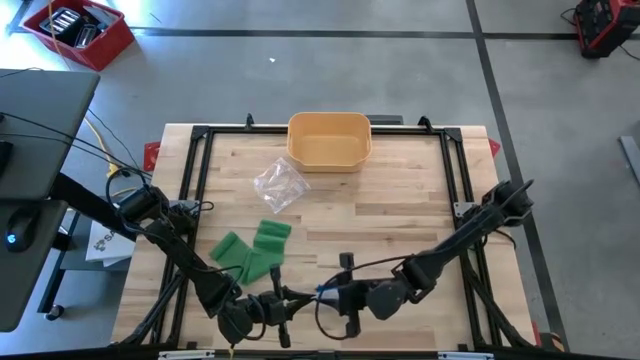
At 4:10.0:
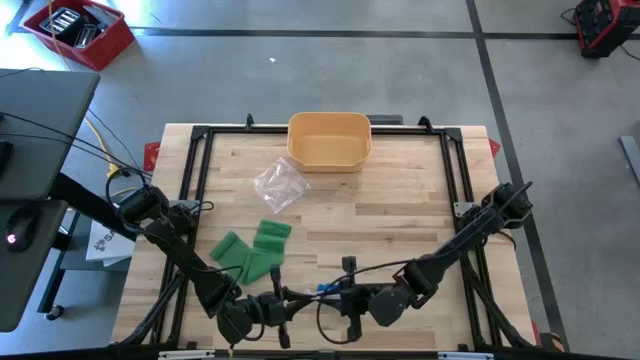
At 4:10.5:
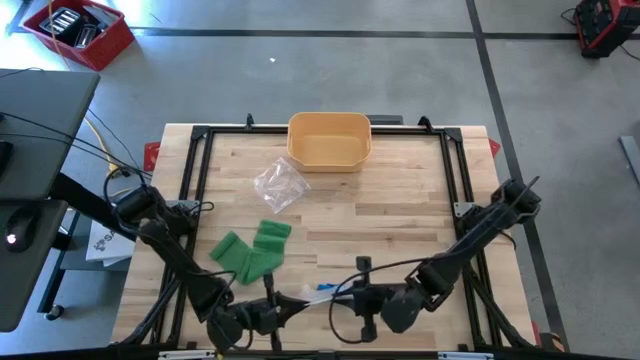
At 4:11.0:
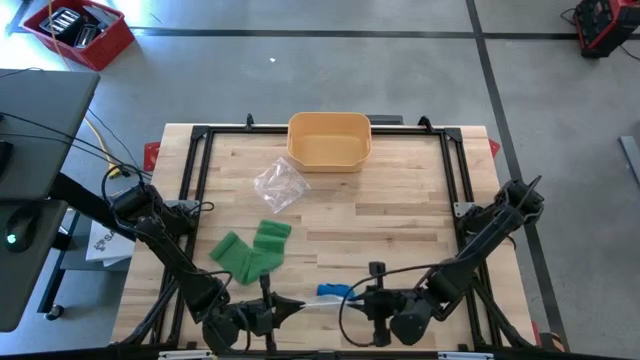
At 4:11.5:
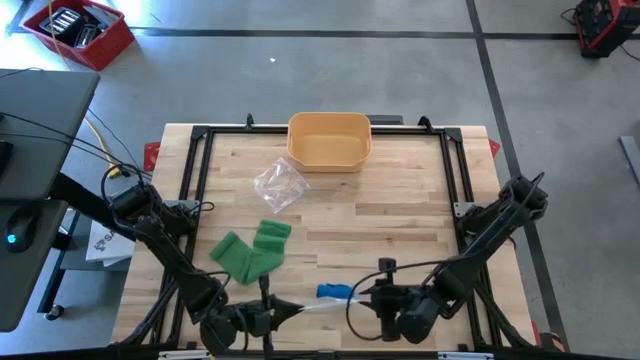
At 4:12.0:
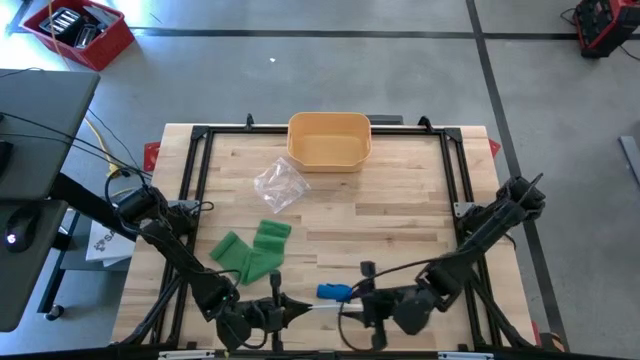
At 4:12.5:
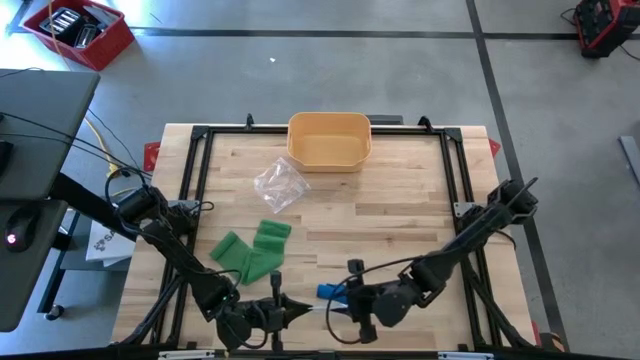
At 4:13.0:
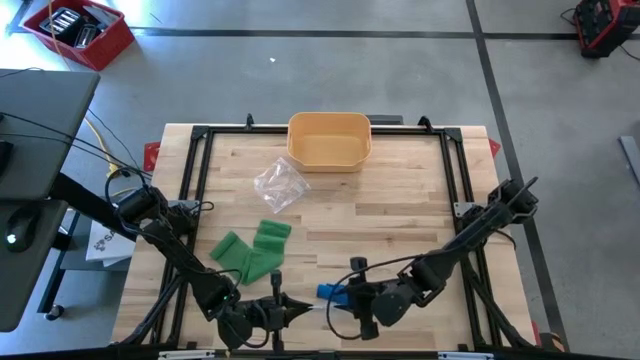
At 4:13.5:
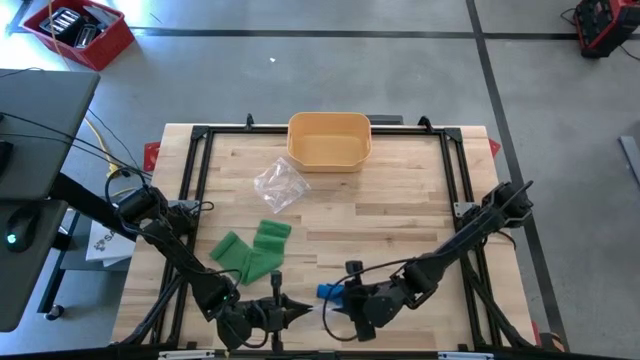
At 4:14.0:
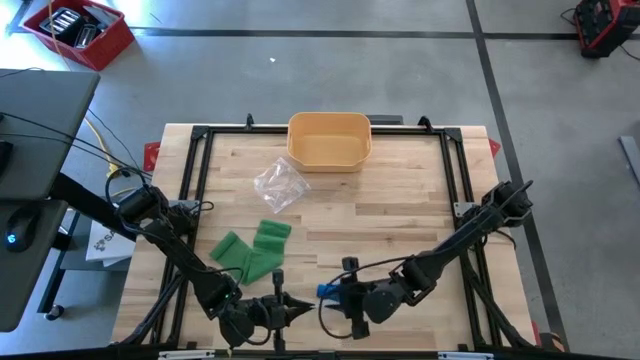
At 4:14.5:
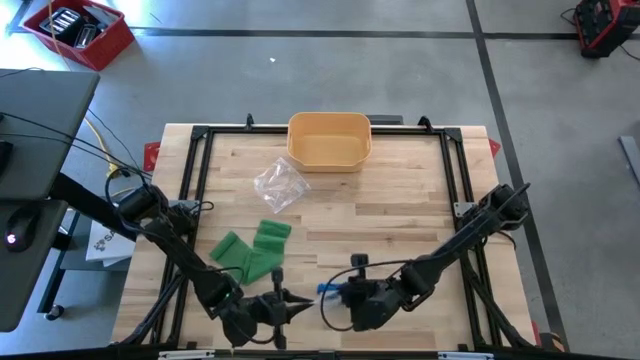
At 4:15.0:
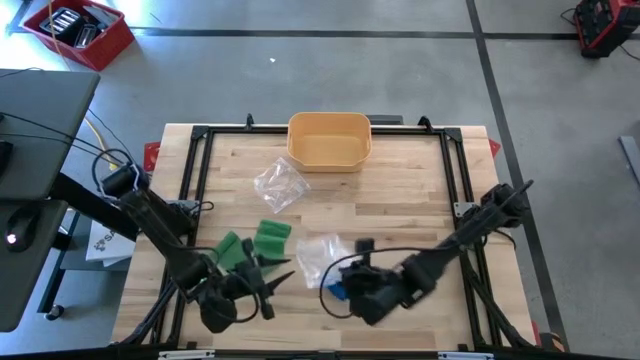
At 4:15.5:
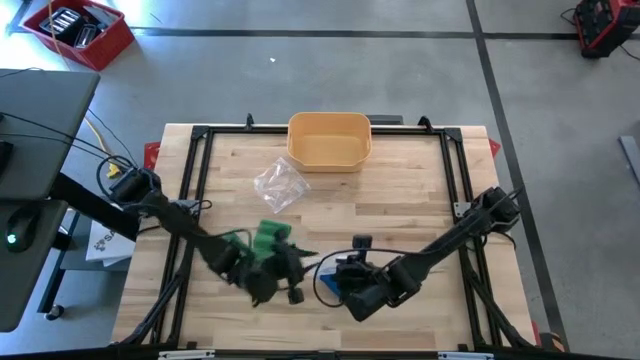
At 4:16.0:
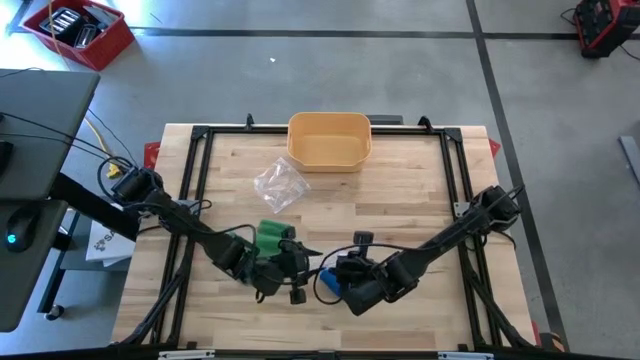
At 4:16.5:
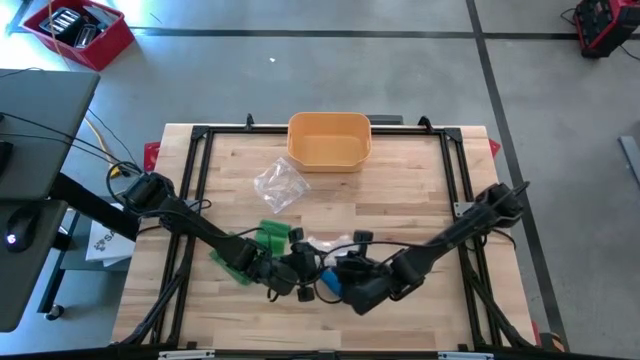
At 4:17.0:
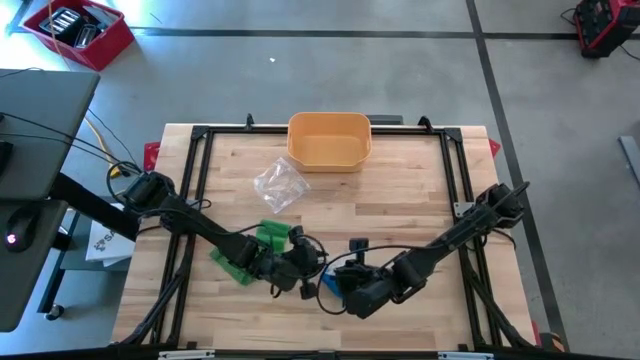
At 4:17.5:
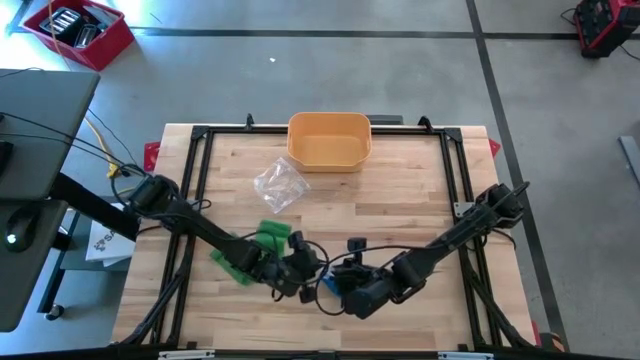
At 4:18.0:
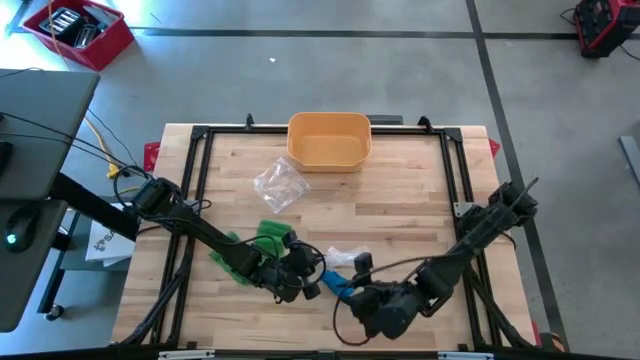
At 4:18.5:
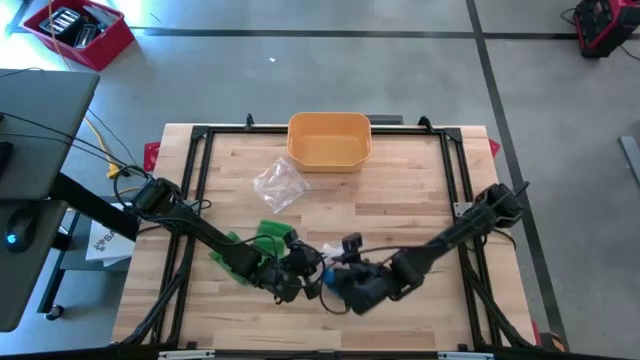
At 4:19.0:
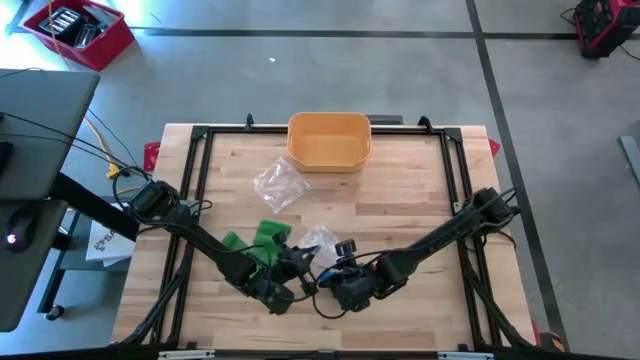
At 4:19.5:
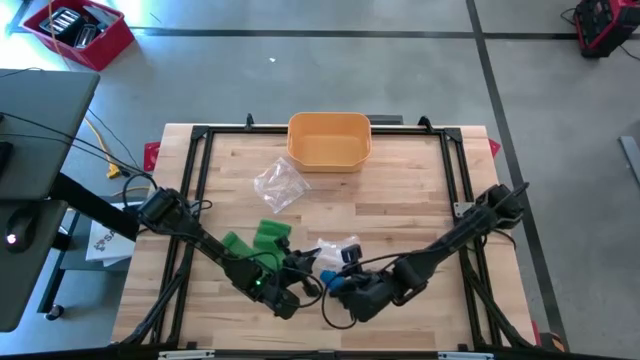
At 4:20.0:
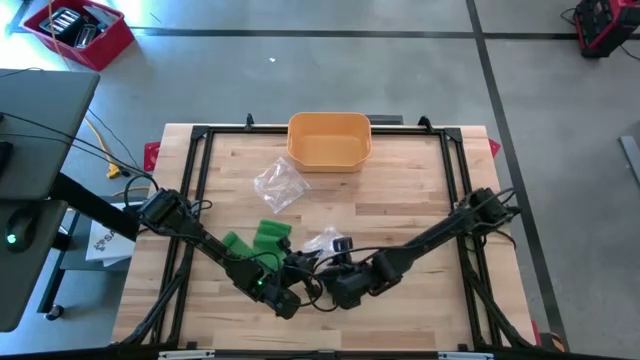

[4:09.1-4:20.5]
Task: Roll bandage
Open the right transparent zip bag

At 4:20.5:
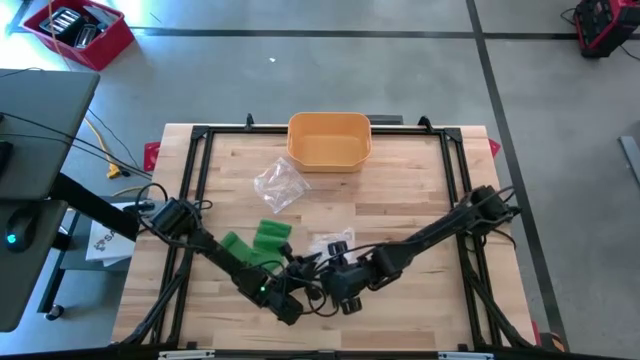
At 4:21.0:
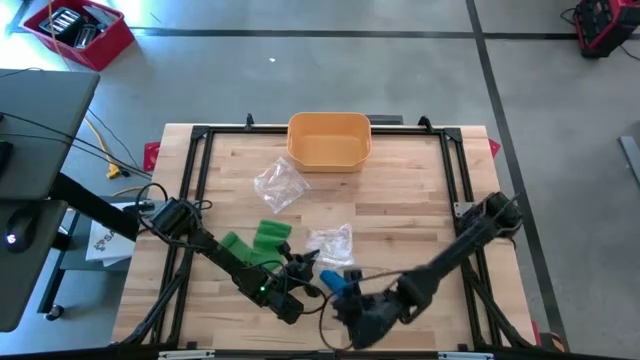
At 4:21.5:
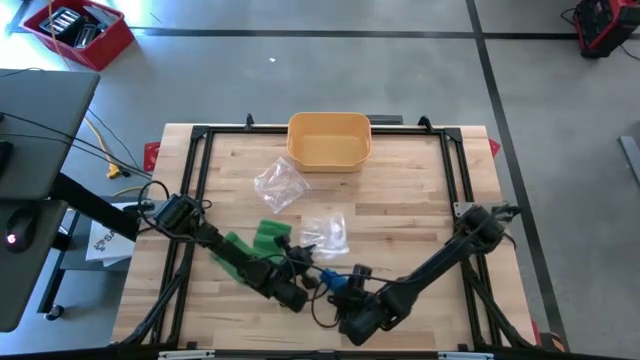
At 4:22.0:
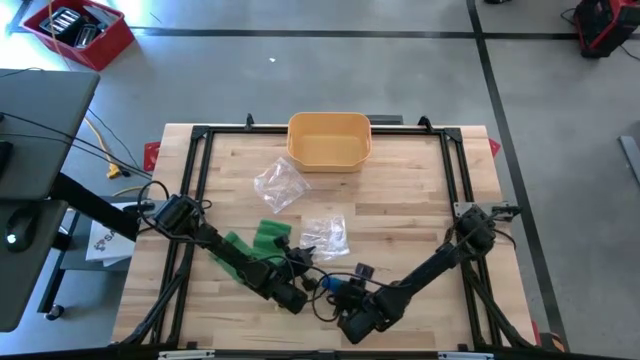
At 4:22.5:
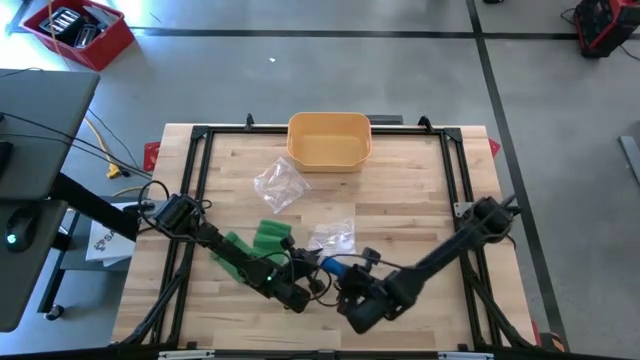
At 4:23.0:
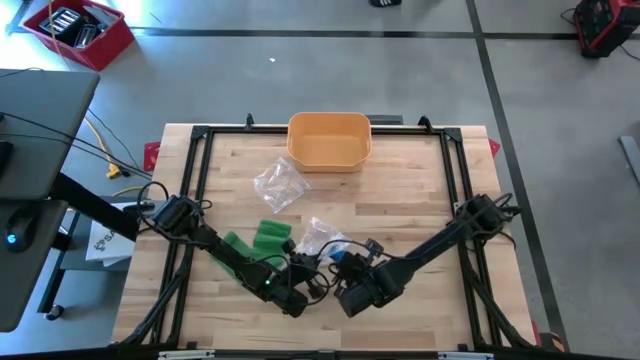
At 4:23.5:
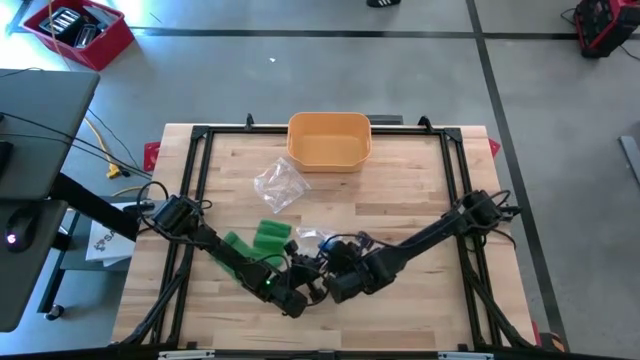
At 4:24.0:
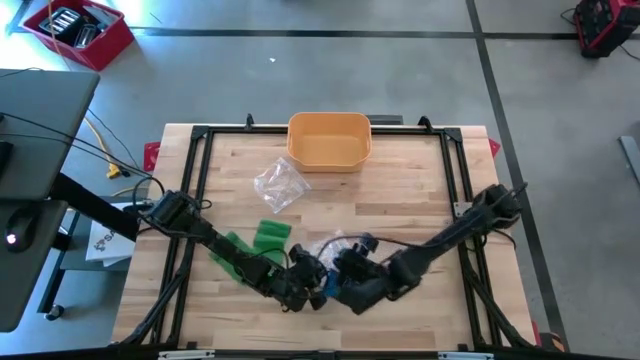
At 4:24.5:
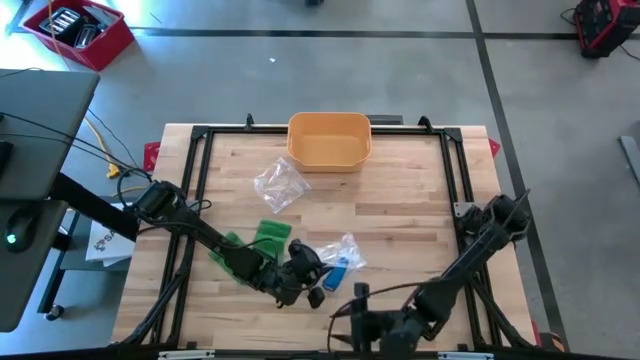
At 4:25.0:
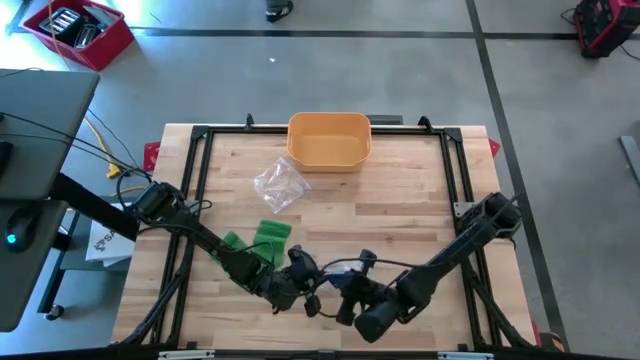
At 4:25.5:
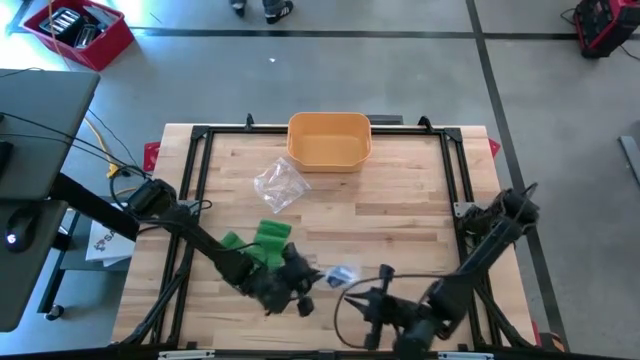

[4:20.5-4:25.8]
Put the rolled blue bandage into the open transparent zip bag

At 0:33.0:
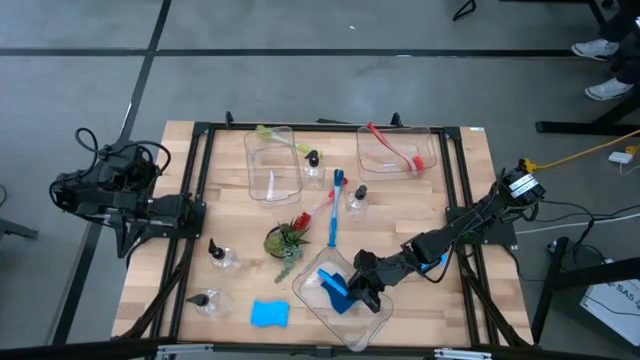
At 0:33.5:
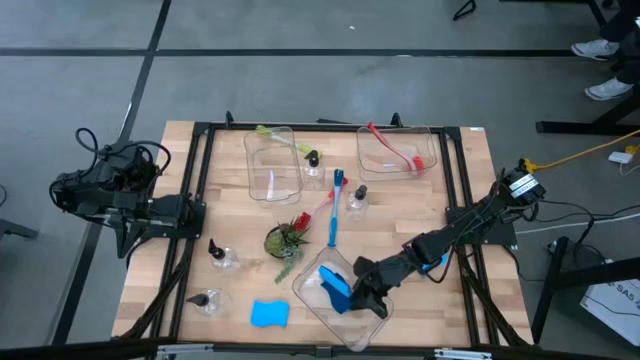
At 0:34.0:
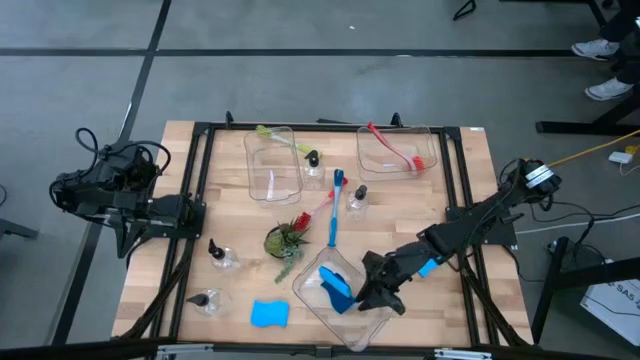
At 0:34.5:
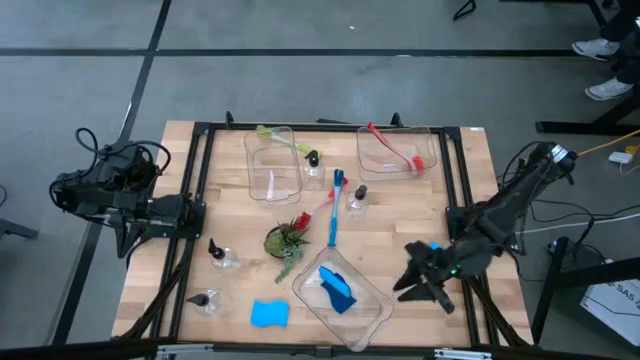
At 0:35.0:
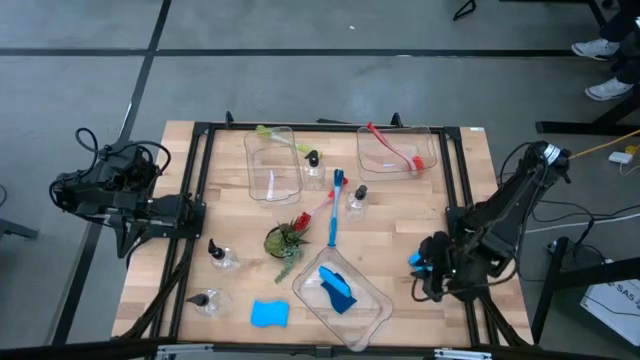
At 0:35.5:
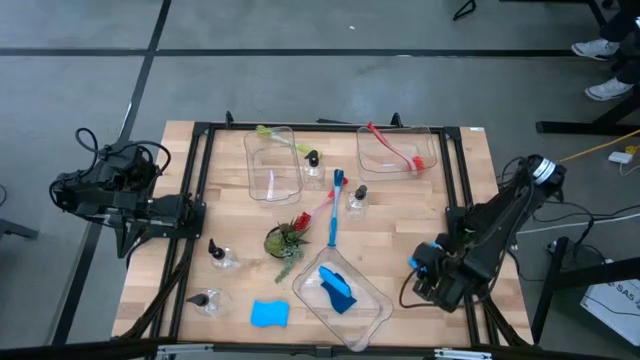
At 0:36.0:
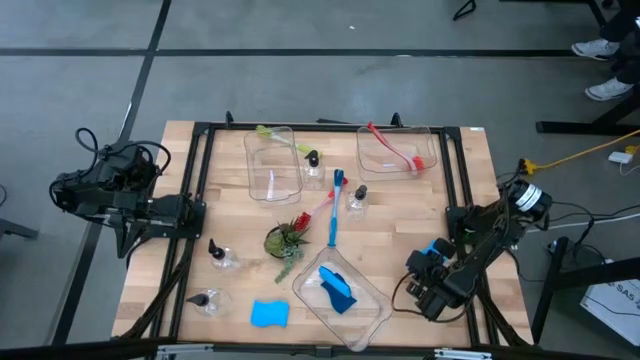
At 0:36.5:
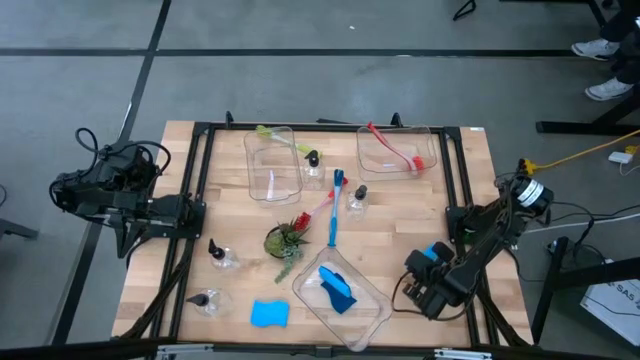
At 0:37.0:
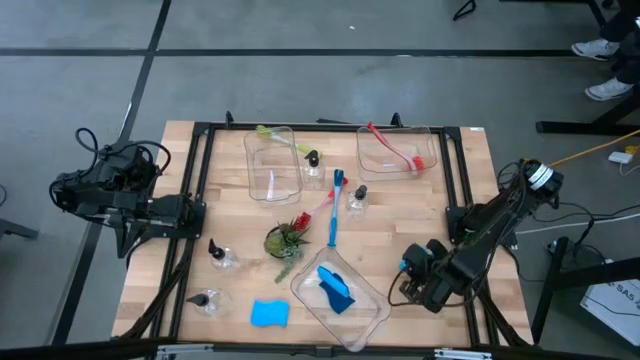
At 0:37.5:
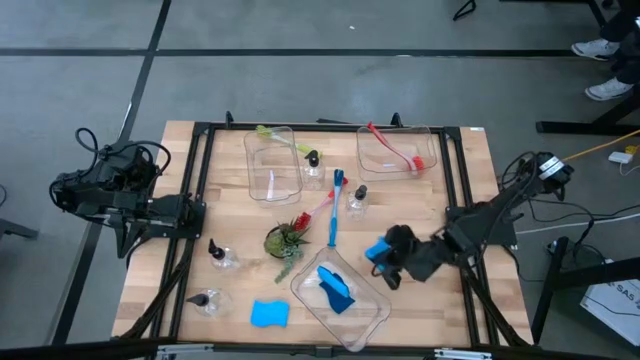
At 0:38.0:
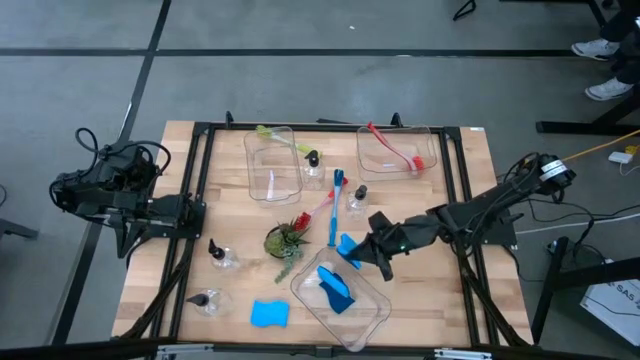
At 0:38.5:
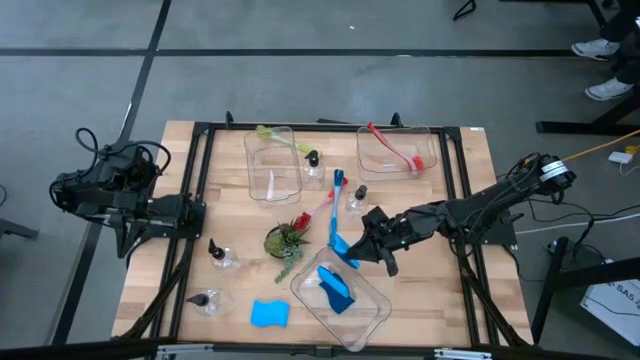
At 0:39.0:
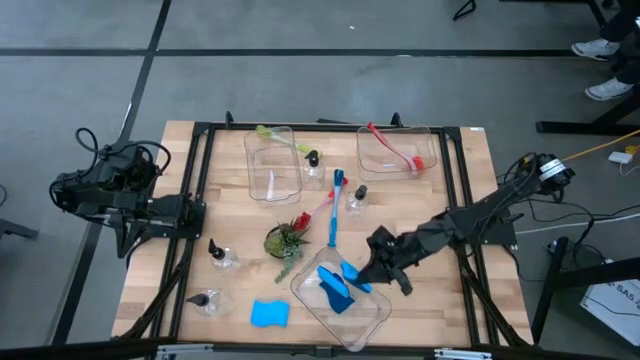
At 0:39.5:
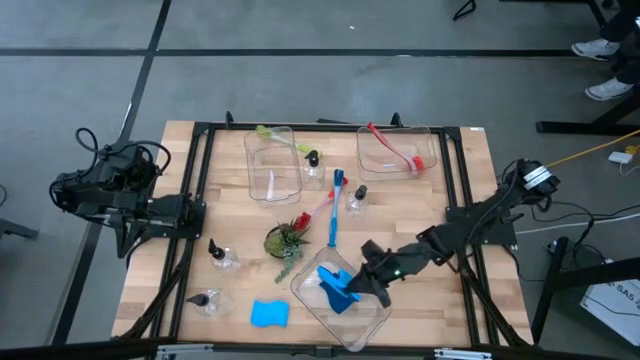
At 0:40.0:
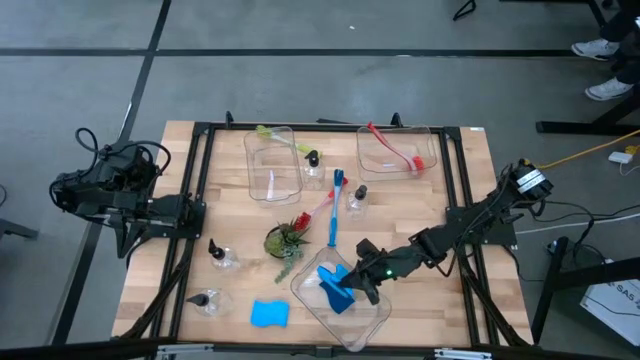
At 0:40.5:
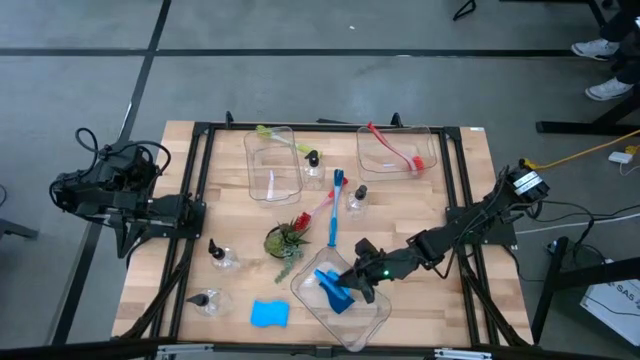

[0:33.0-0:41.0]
Task: Pick & Place Kitchen Sink Supplies
Put the blue sponge into the bottom transparent bin
